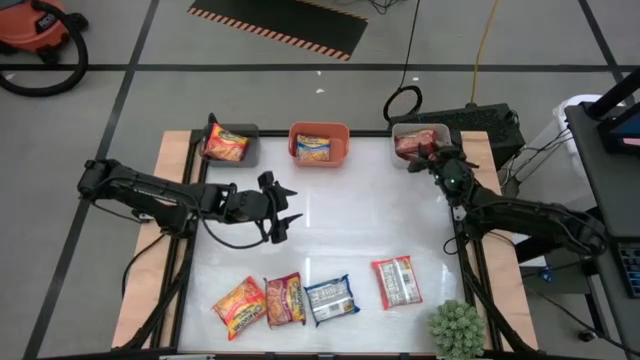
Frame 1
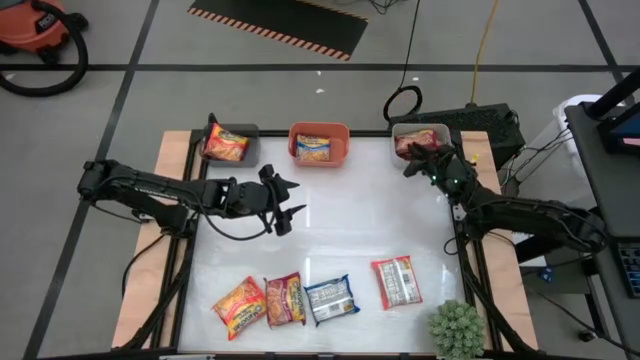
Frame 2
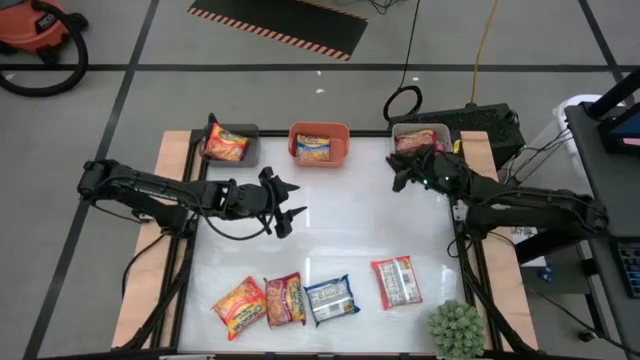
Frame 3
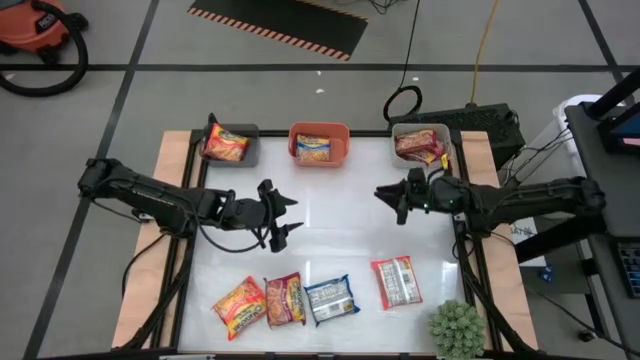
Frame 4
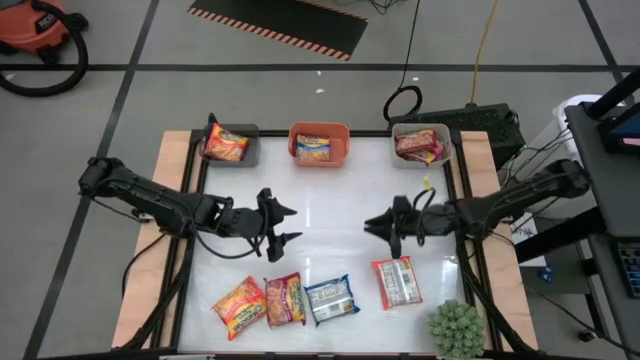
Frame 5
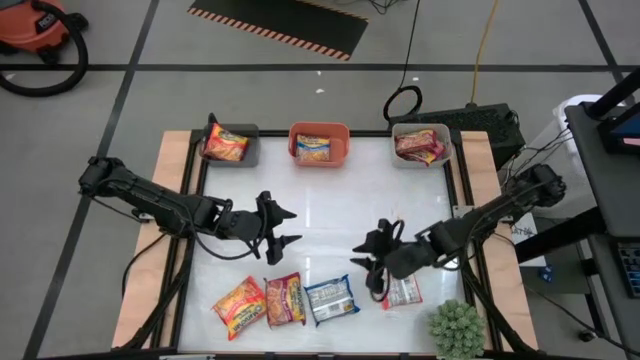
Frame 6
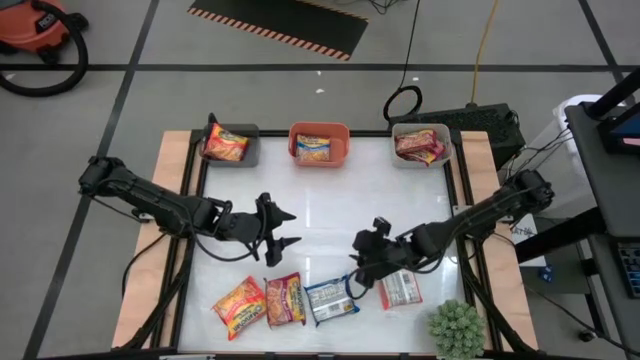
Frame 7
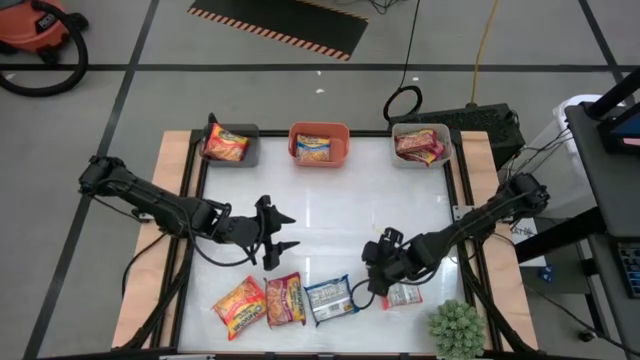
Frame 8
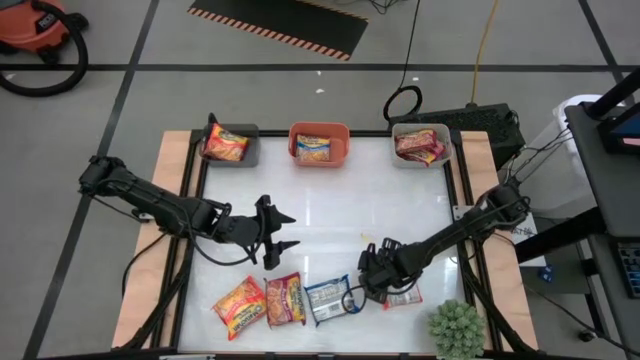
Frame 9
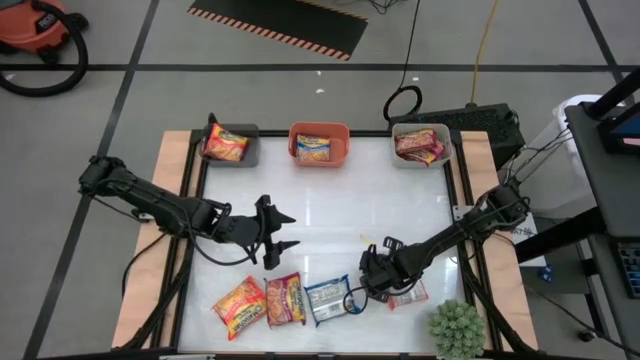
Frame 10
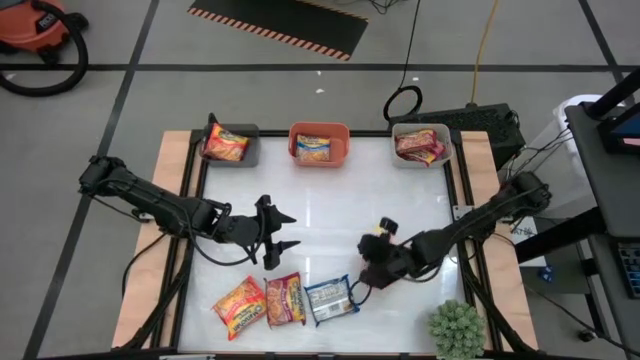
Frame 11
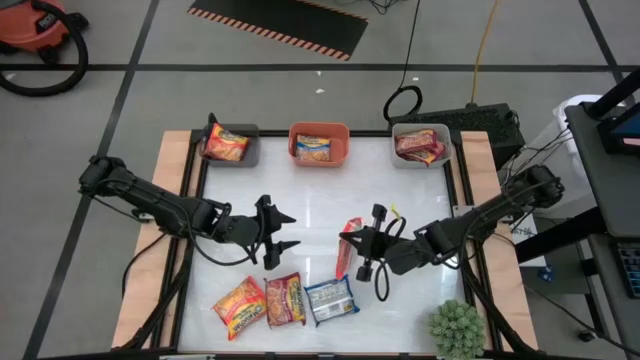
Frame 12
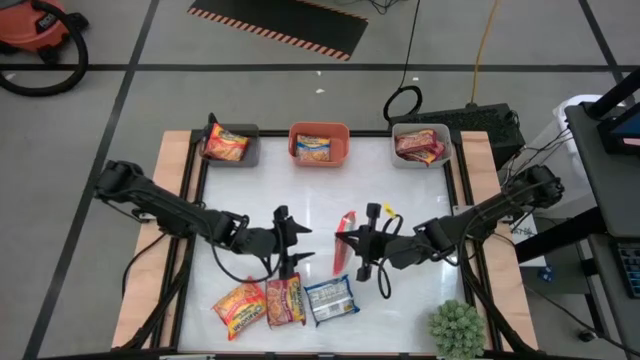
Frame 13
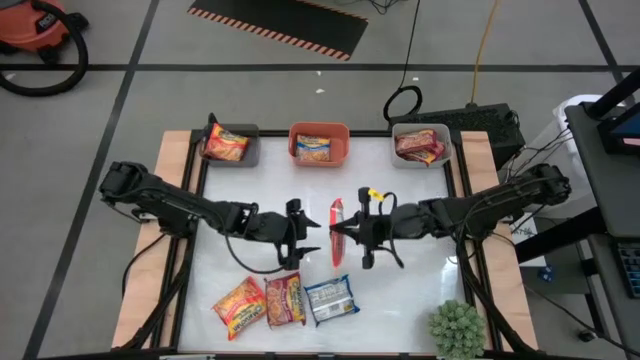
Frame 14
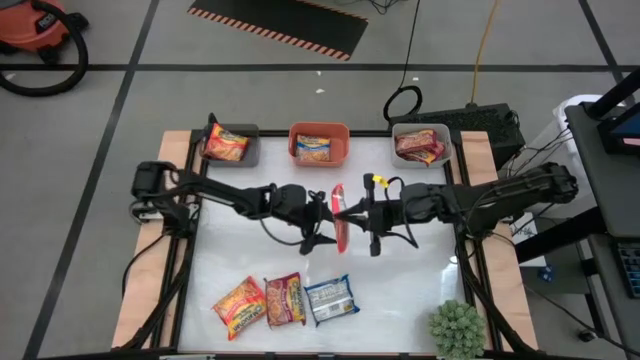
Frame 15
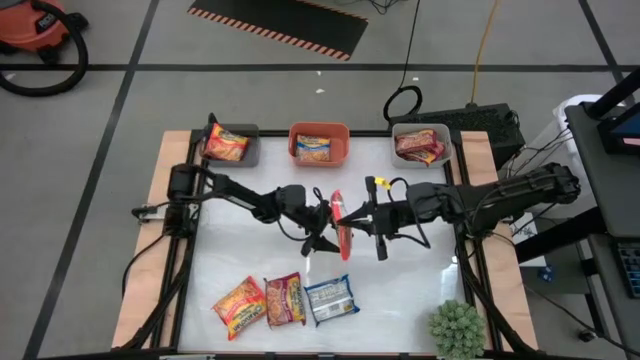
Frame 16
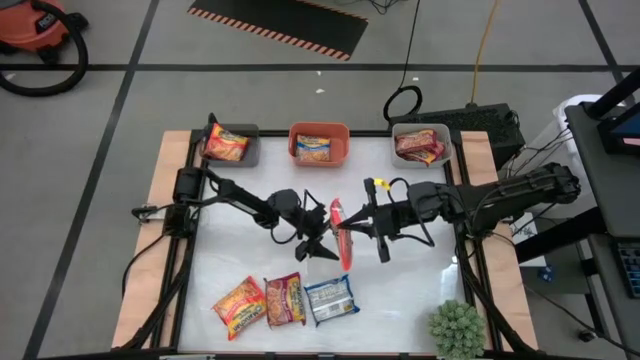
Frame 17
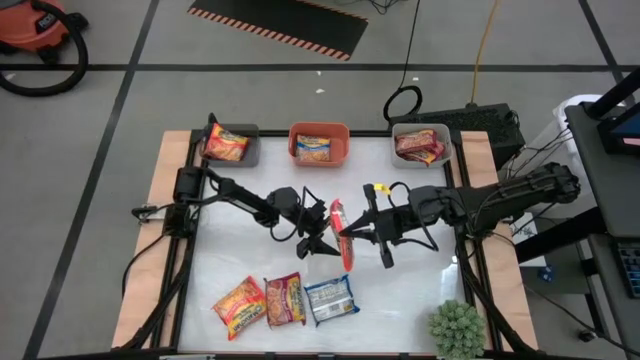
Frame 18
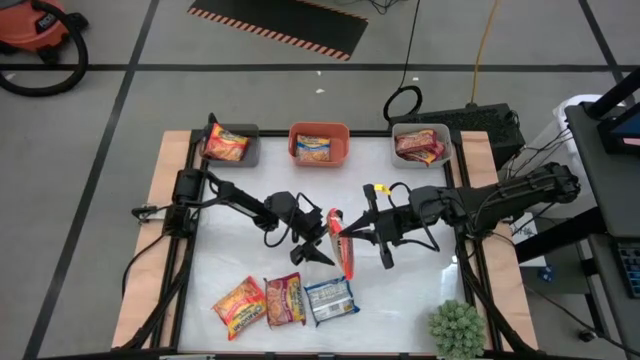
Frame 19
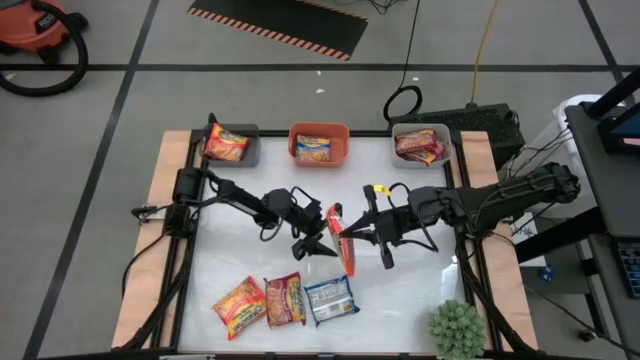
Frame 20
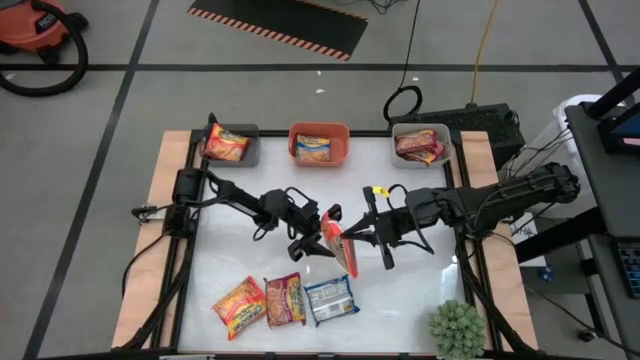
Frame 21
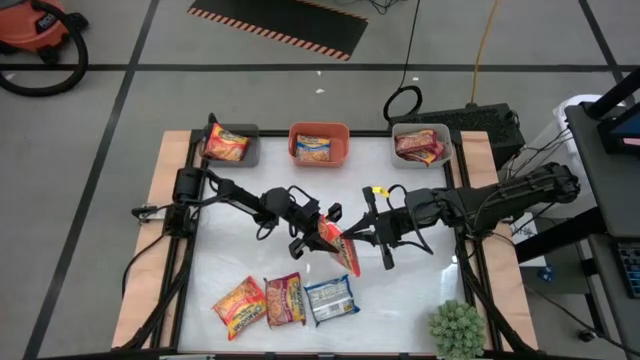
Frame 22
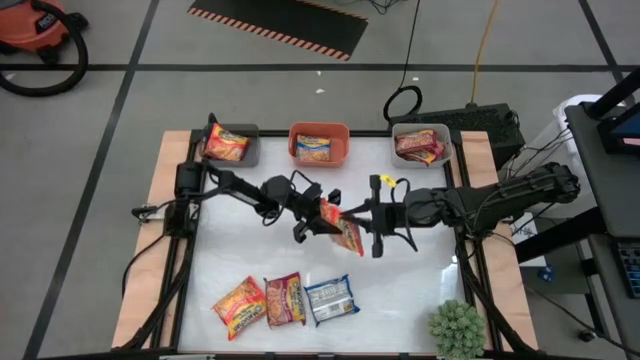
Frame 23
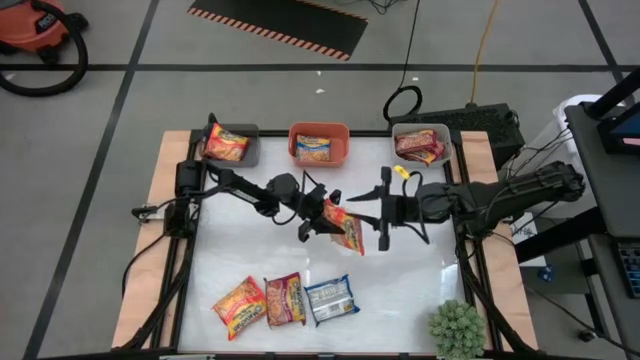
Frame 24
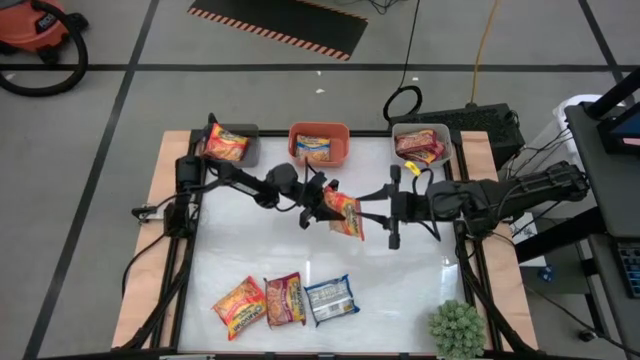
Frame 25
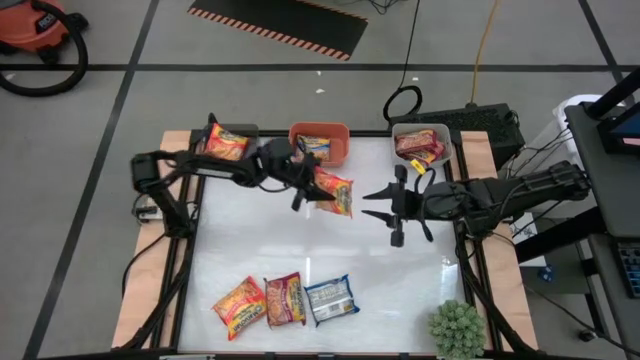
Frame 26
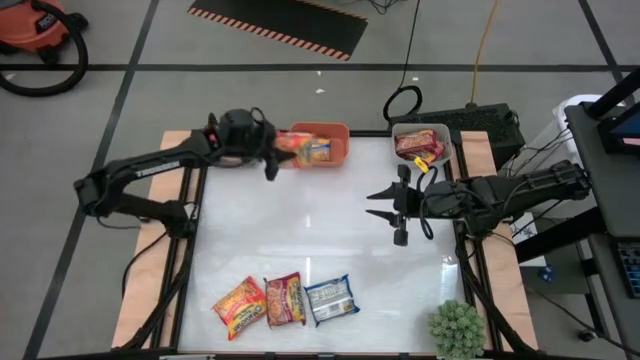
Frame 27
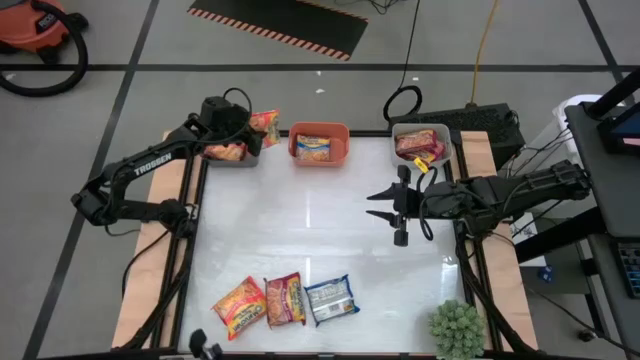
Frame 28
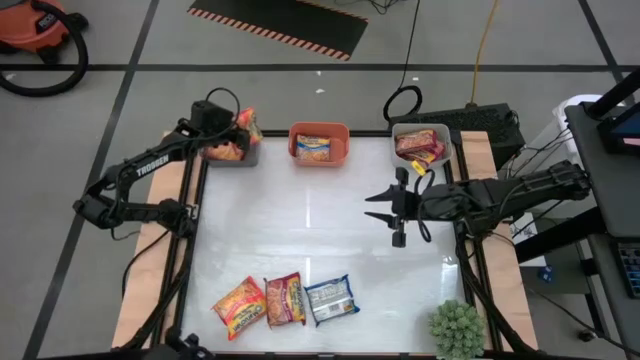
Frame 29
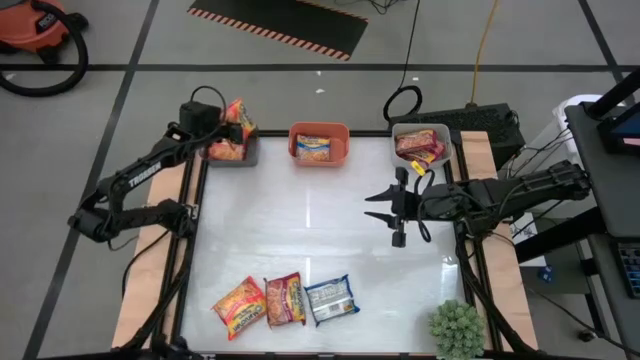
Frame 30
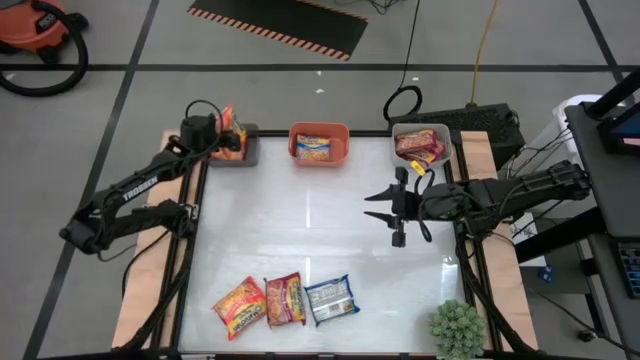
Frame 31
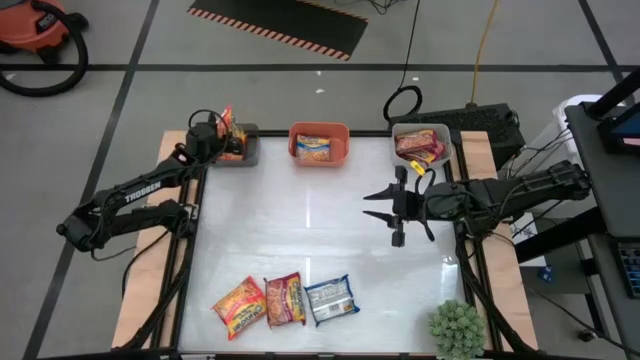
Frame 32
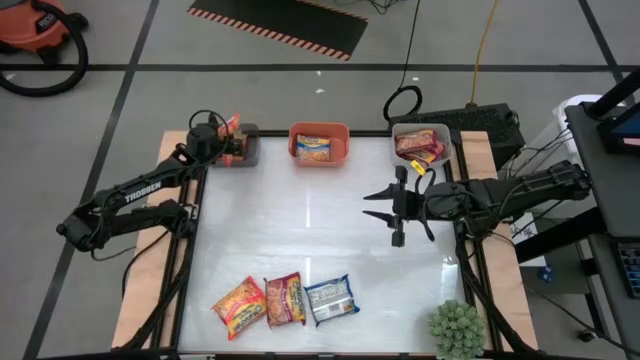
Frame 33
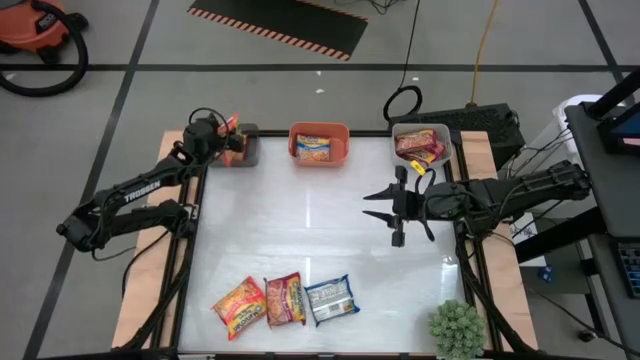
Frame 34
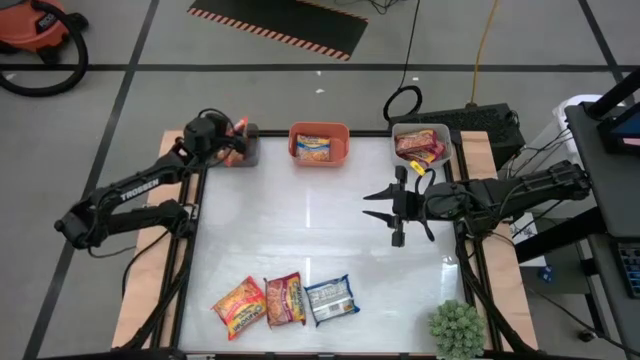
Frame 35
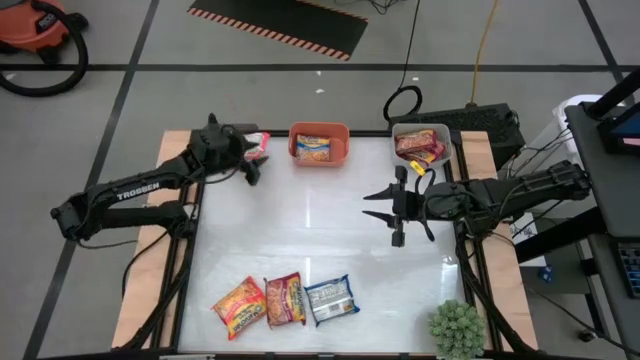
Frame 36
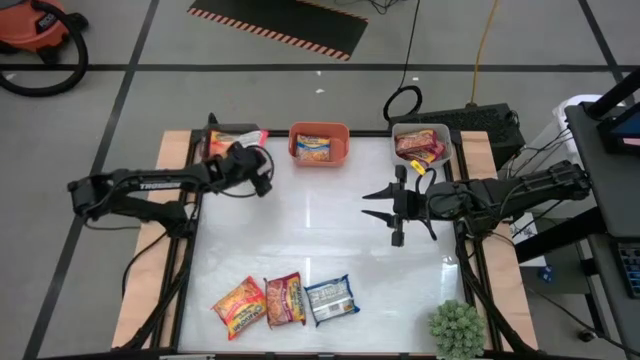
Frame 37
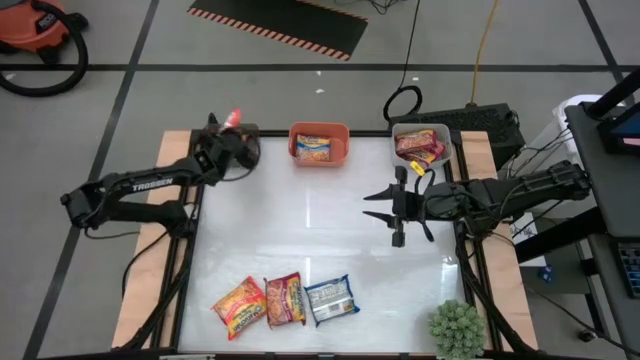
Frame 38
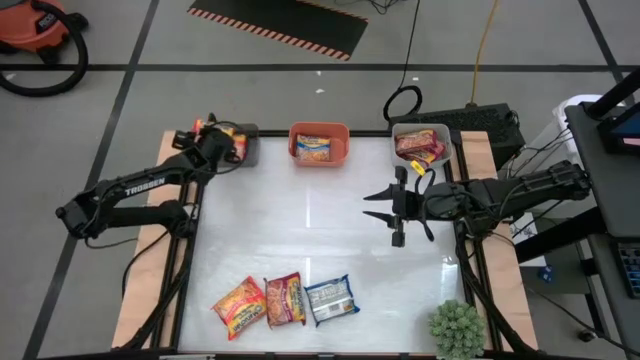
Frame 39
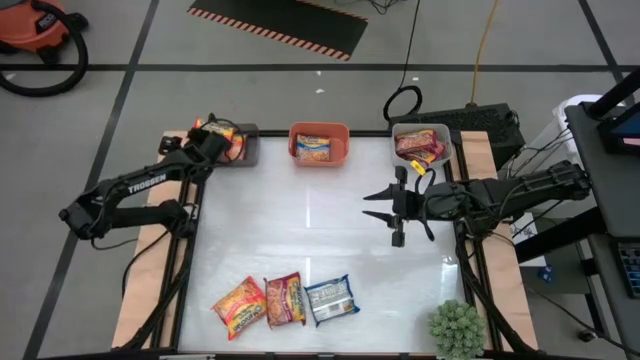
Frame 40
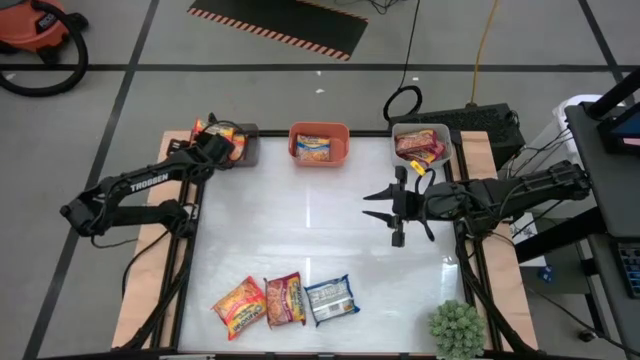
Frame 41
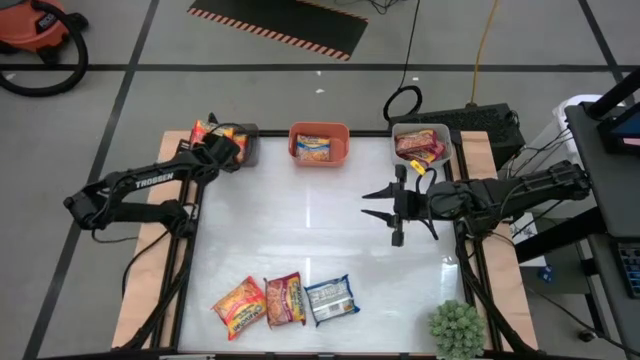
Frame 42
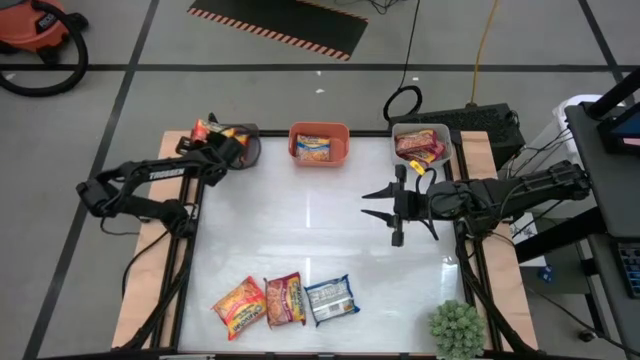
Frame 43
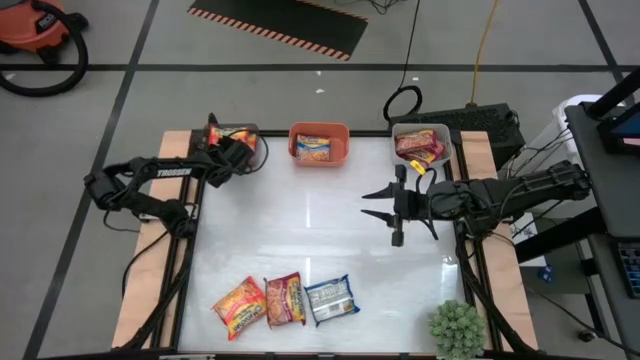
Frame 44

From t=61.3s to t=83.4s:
Task: Sort Maruchan noodles
Put the right orange noodle pack into the black bin
